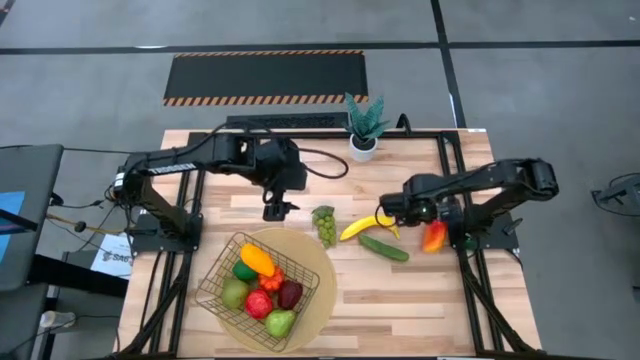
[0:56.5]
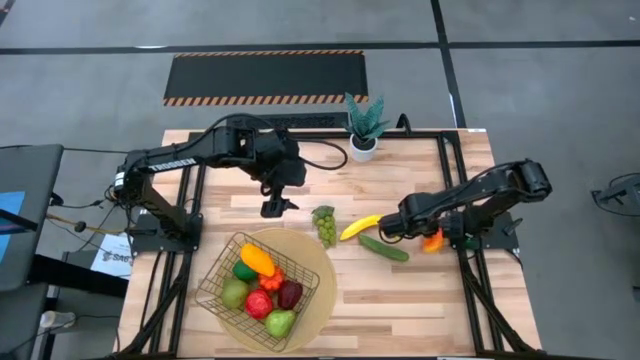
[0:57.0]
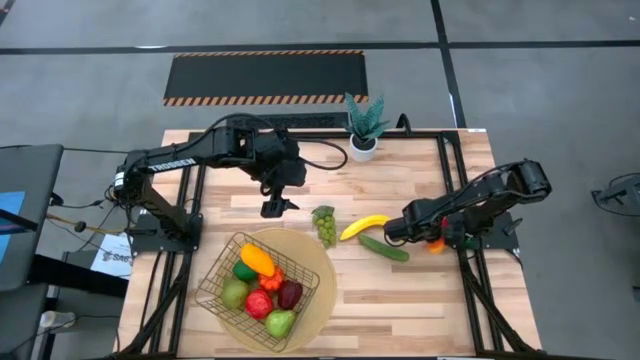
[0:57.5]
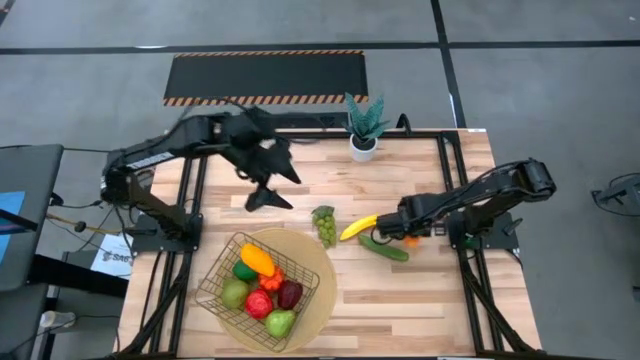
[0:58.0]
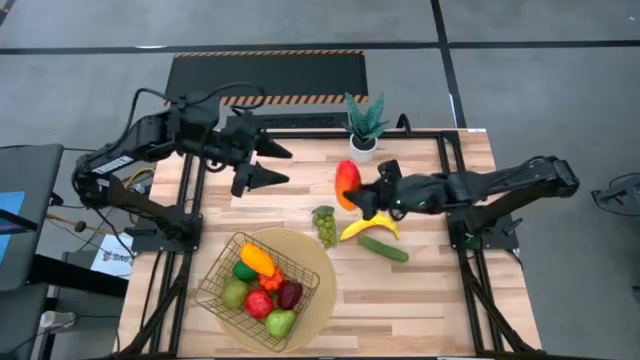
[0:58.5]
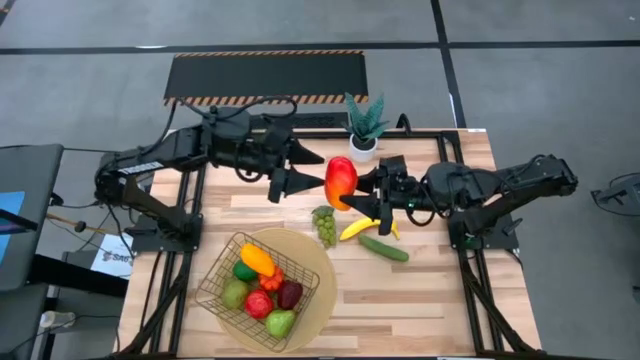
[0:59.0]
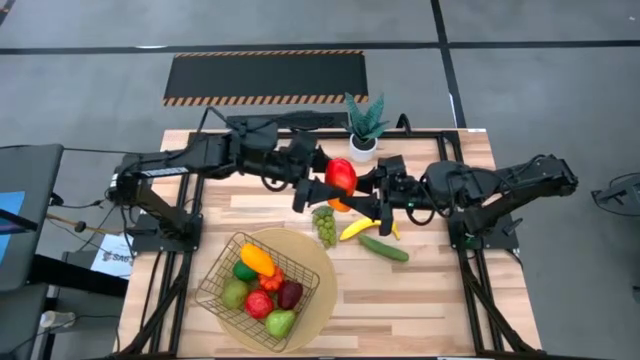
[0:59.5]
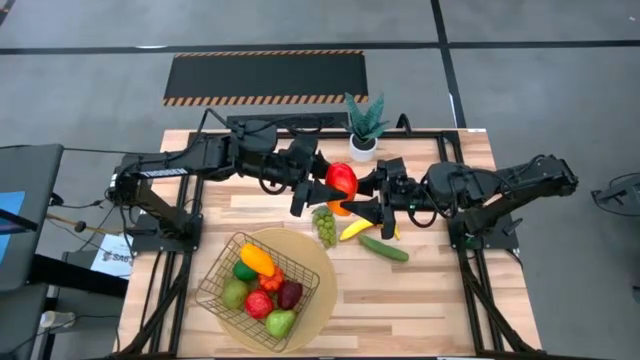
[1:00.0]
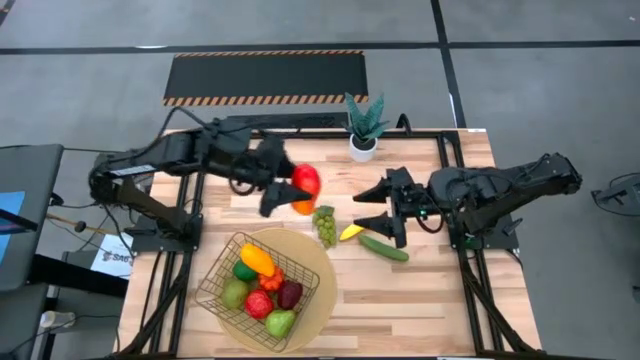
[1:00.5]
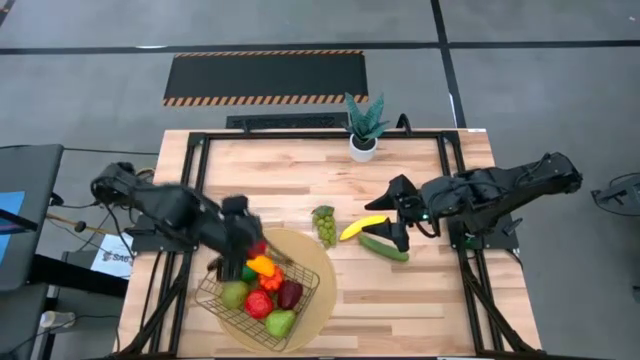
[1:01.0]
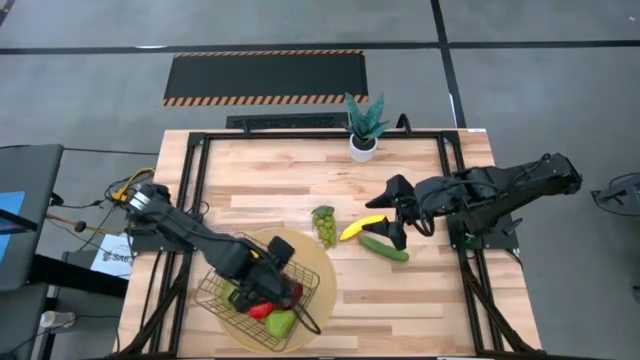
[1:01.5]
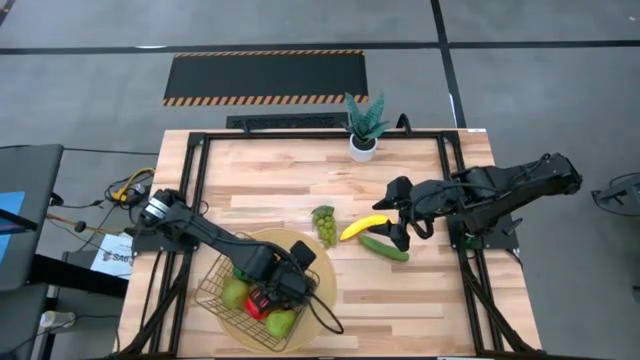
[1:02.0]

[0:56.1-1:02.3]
Task: Build produce basket
Put the red mango into the mesh basket

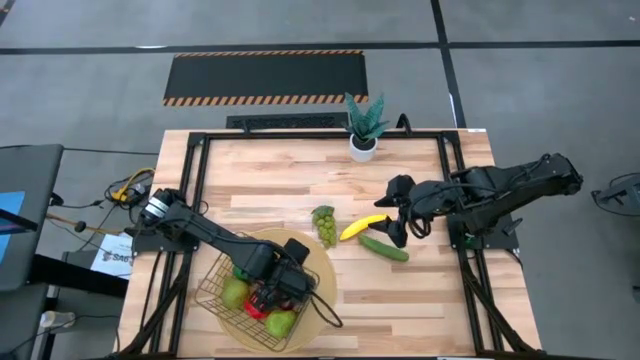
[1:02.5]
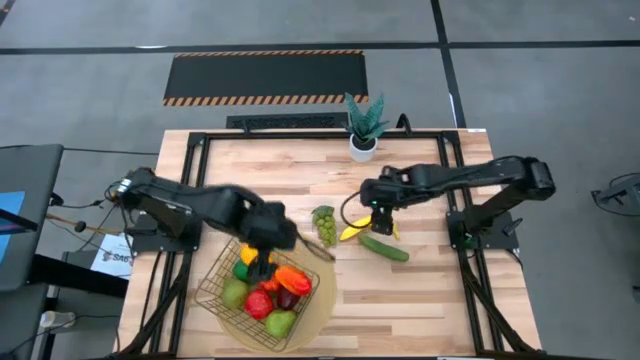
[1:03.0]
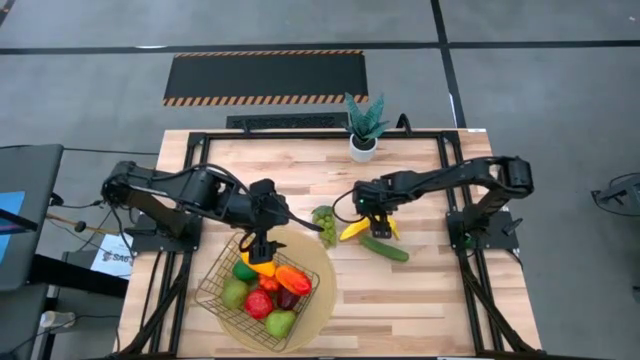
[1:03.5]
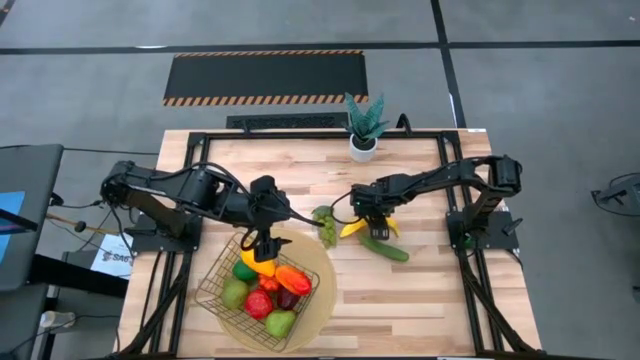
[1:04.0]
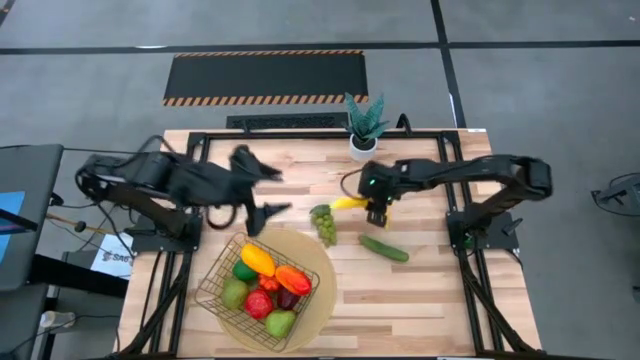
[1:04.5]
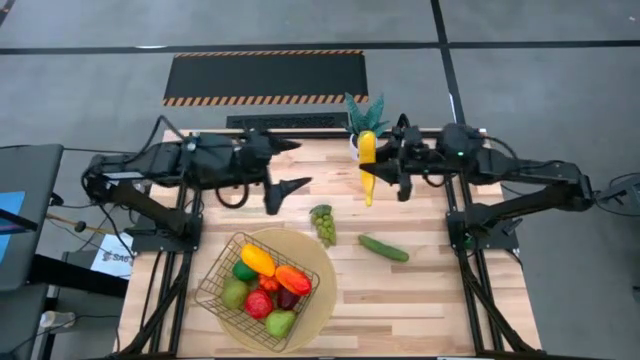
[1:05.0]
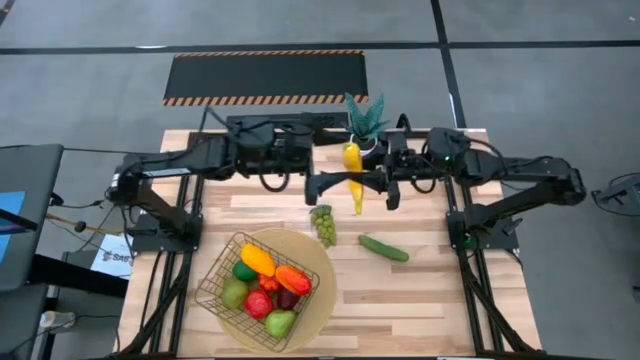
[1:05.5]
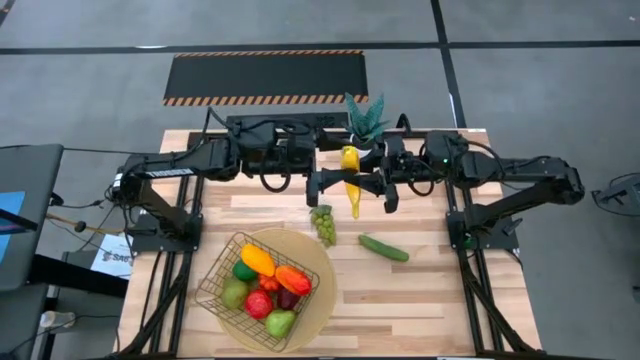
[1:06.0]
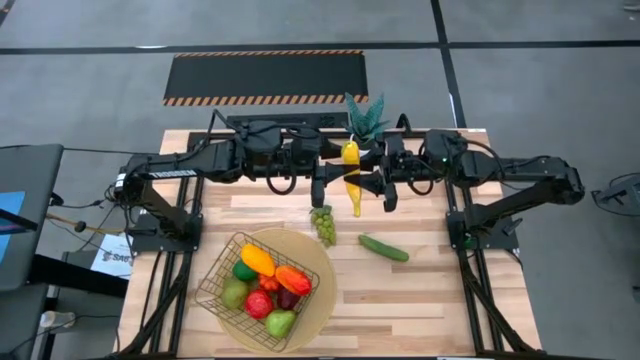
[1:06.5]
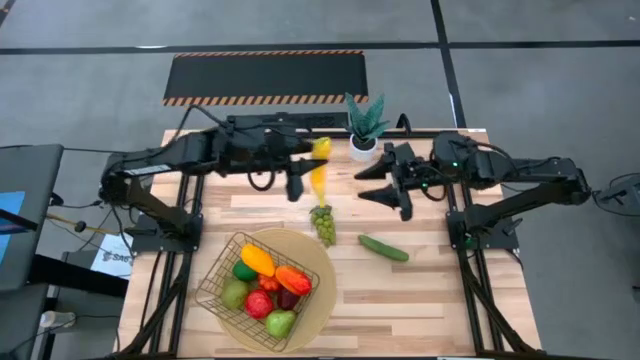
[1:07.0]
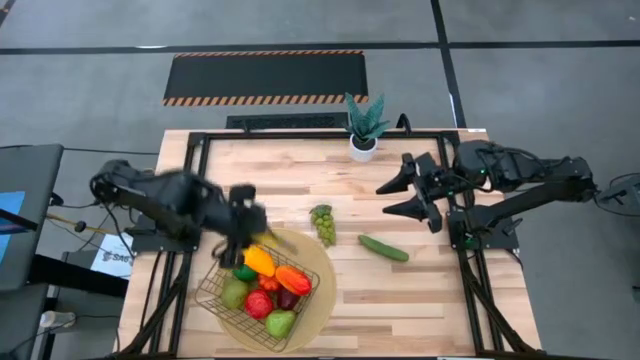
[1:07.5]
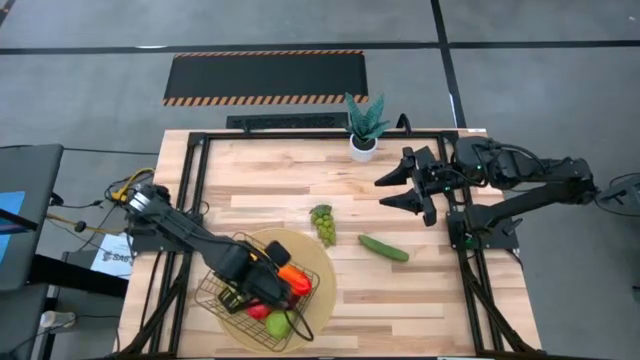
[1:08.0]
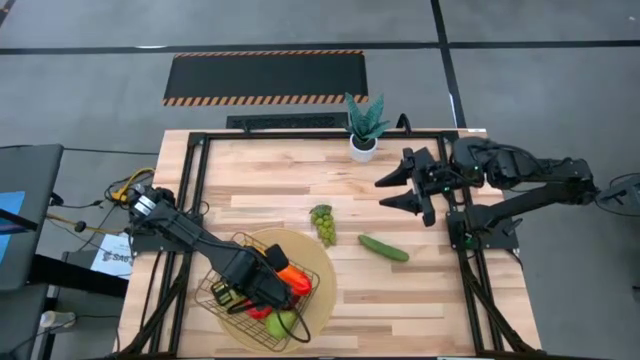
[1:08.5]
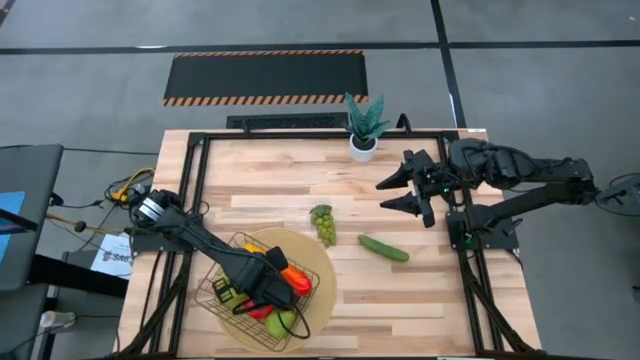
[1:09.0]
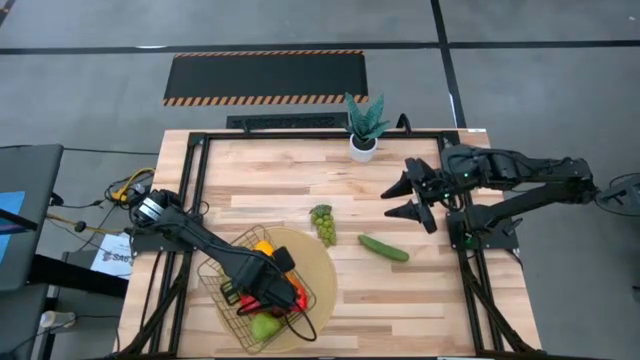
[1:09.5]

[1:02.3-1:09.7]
Put the banana into the mesh basket

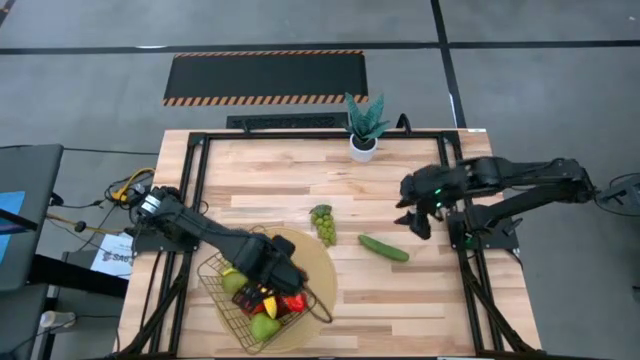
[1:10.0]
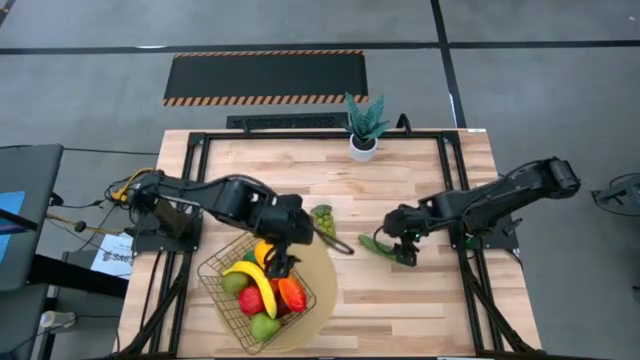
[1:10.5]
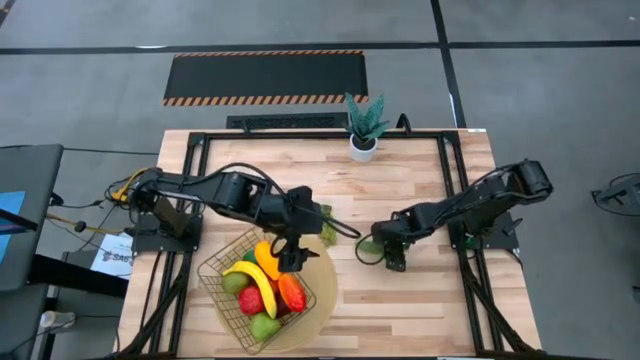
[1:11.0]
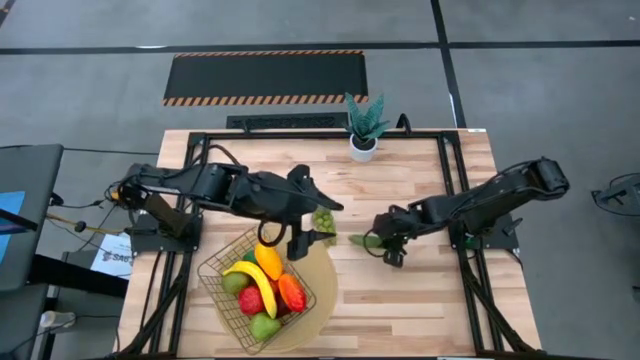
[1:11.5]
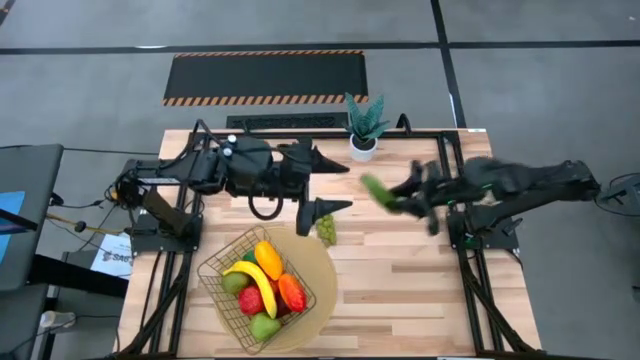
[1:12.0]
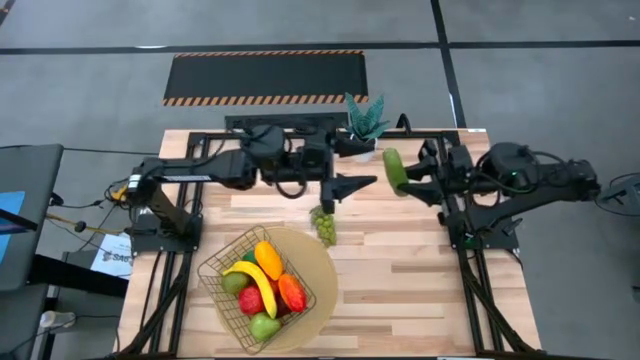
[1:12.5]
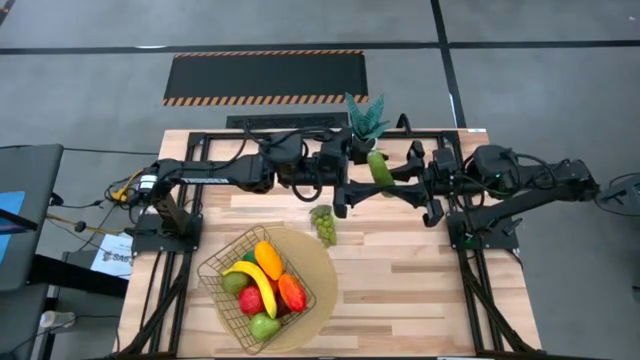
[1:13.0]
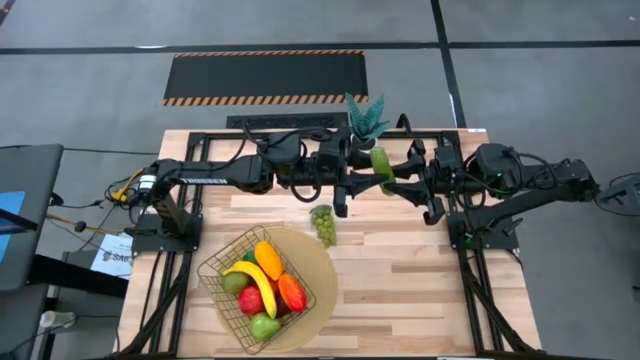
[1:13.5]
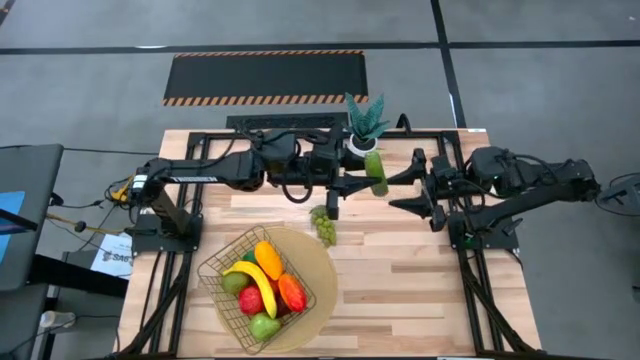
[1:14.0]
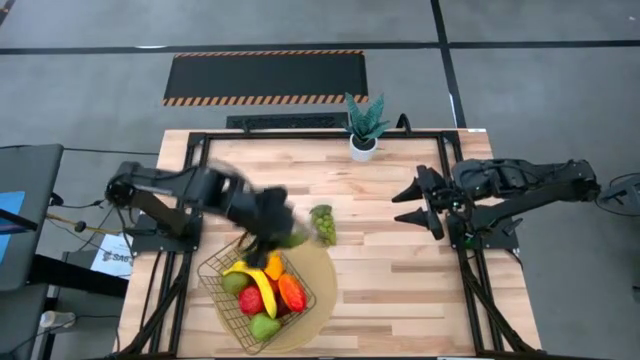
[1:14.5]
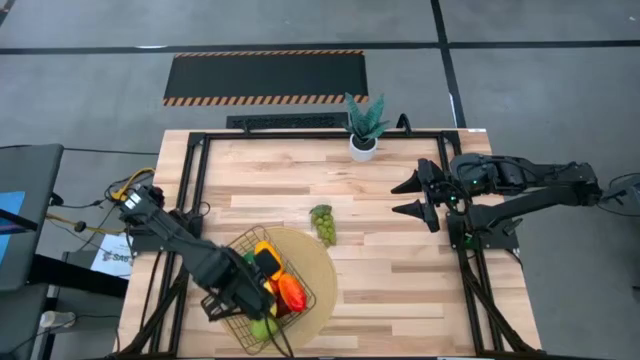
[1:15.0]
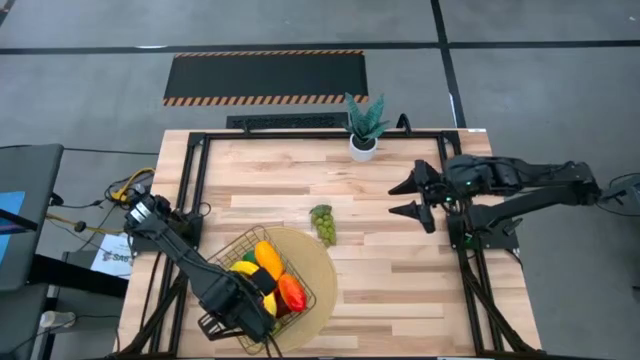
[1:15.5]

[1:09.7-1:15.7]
Put cucumber into the mesh basket

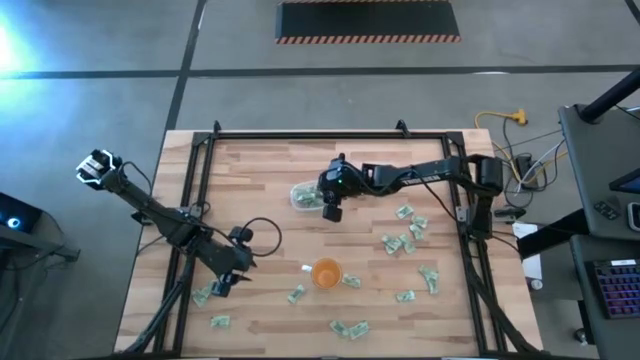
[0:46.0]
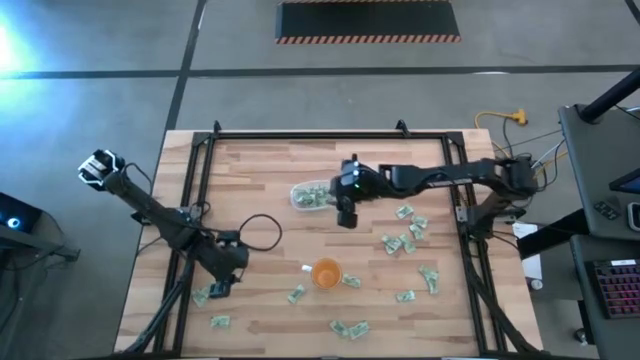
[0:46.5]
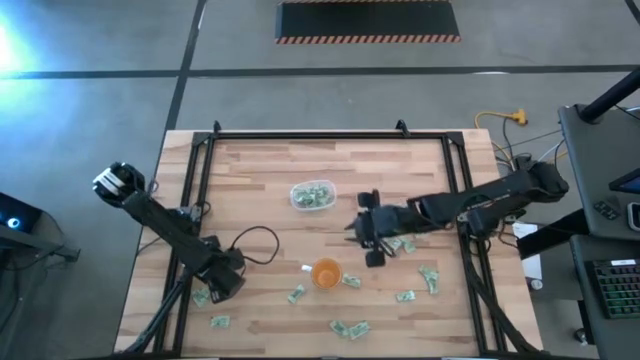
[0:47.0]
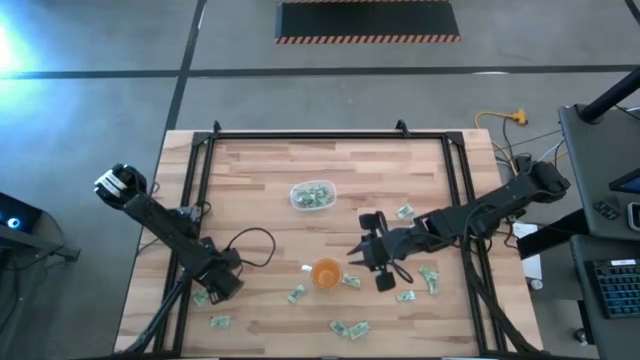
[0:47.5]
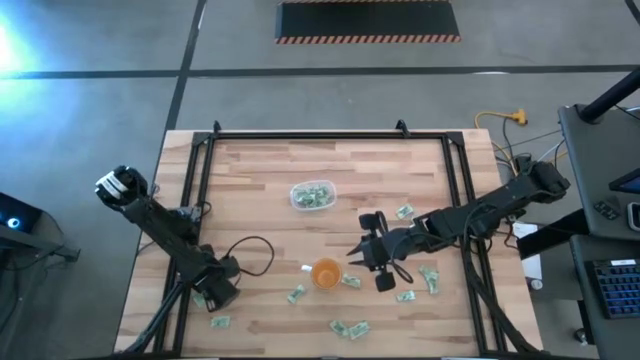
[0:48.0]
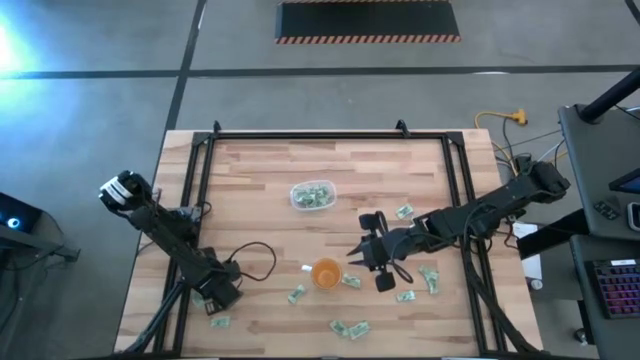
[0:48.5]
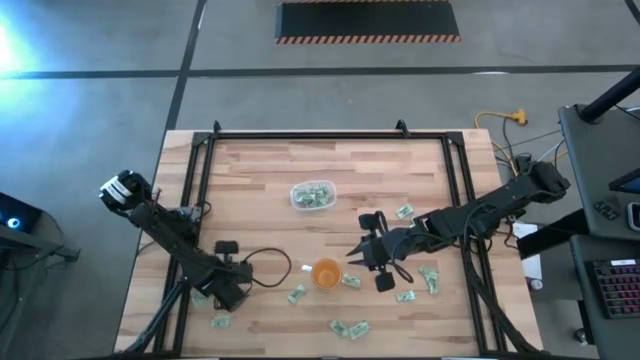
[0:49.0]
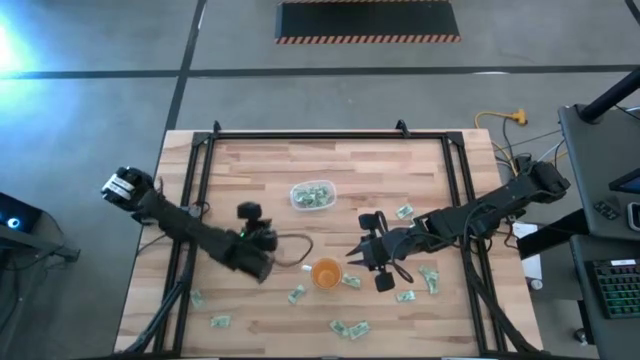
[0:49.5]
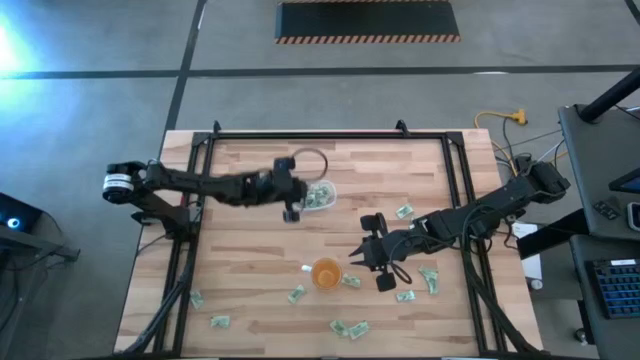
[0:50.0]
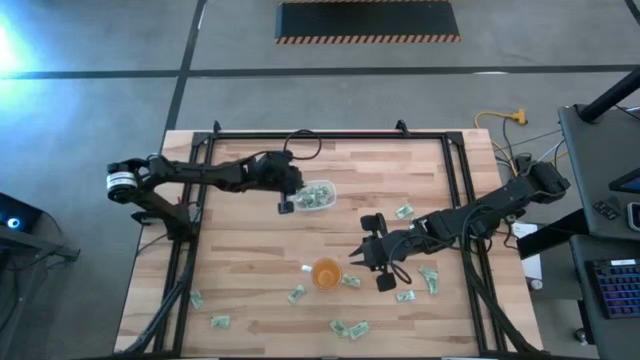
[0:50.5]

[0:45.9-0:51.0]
Task: Pick and place Stevia / Truvia into bins
Put the stevia packet into the transparent bin
